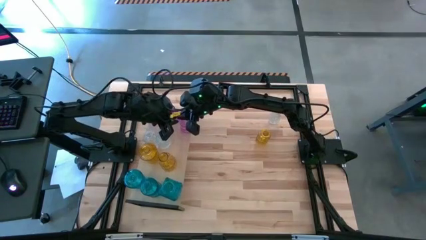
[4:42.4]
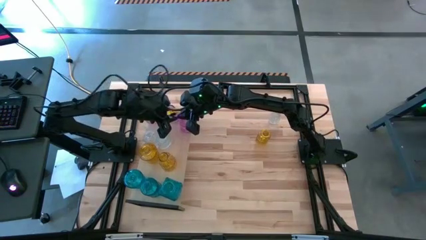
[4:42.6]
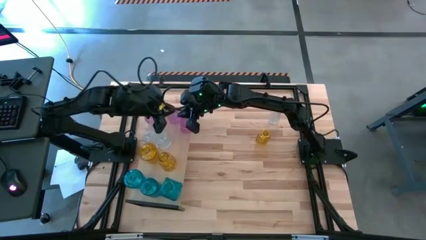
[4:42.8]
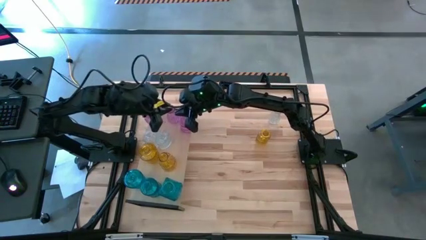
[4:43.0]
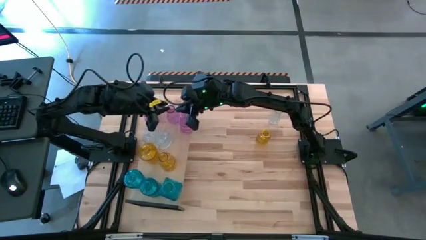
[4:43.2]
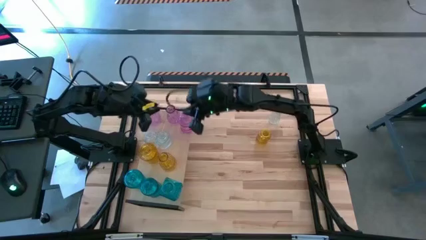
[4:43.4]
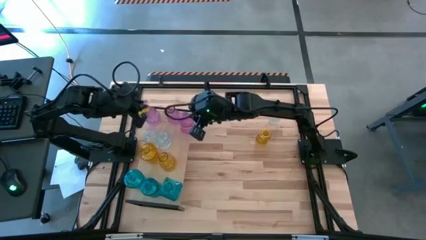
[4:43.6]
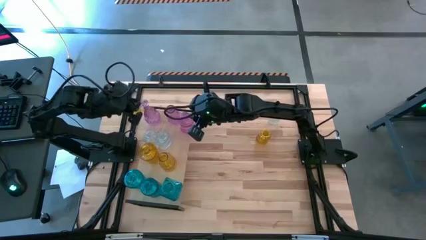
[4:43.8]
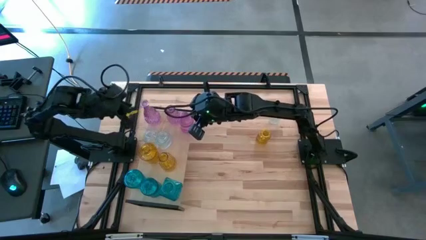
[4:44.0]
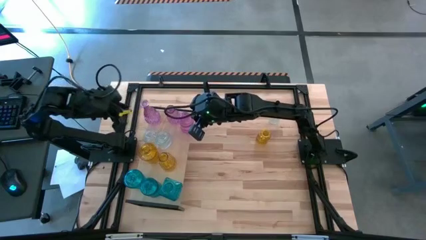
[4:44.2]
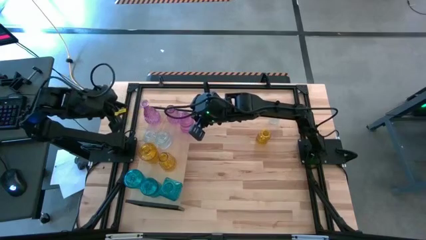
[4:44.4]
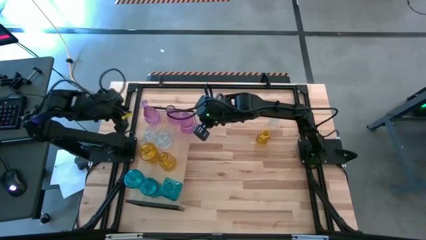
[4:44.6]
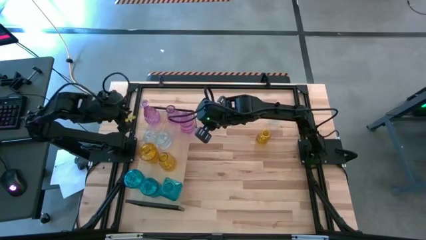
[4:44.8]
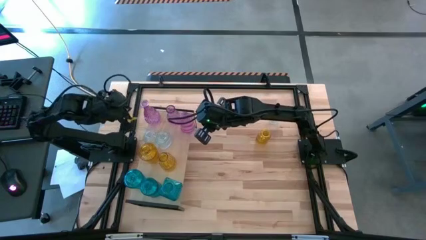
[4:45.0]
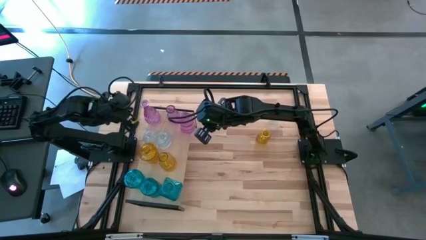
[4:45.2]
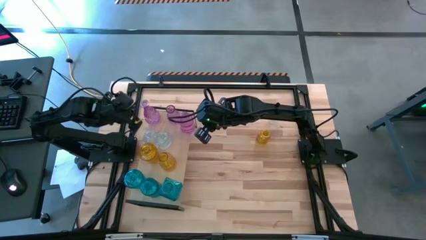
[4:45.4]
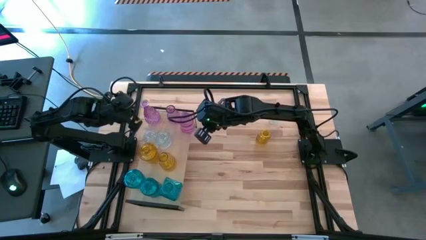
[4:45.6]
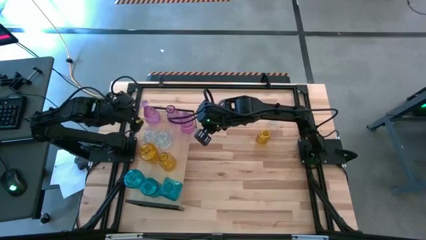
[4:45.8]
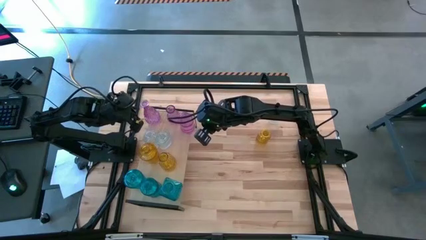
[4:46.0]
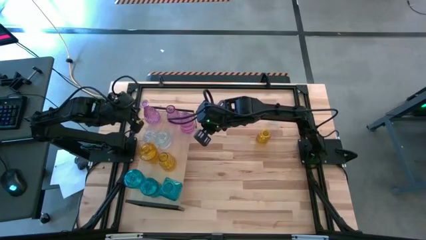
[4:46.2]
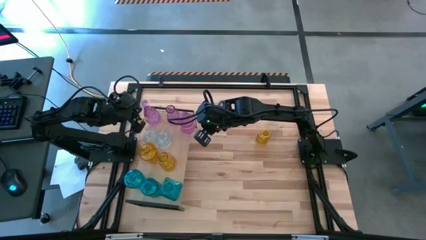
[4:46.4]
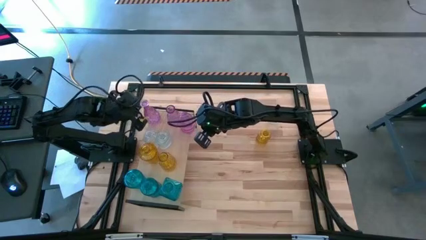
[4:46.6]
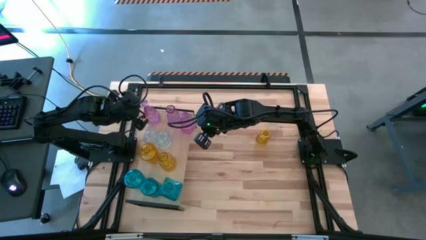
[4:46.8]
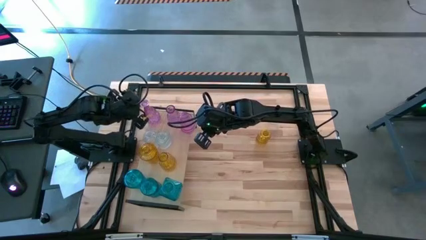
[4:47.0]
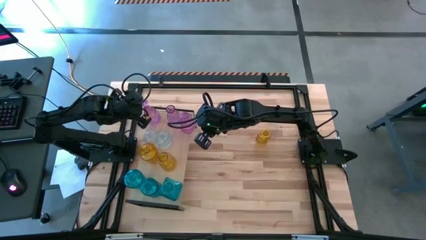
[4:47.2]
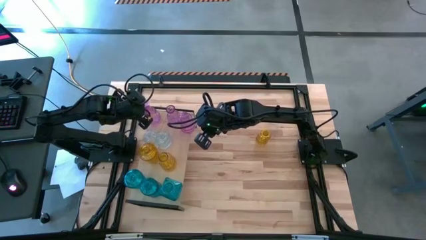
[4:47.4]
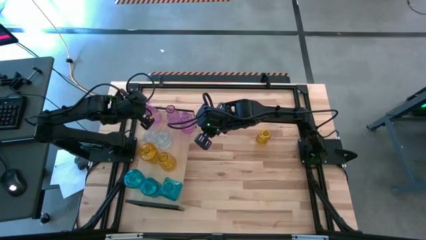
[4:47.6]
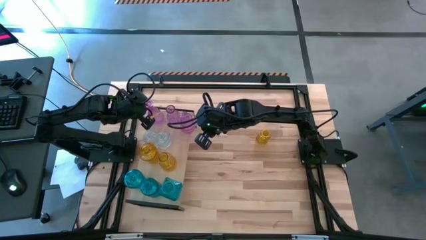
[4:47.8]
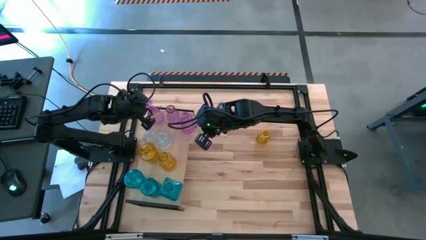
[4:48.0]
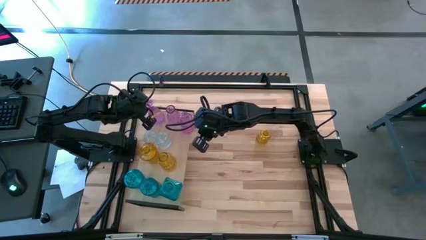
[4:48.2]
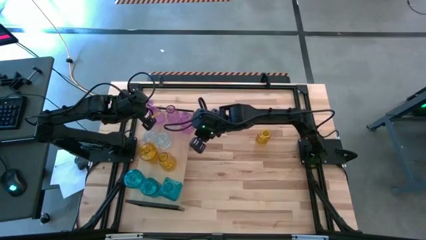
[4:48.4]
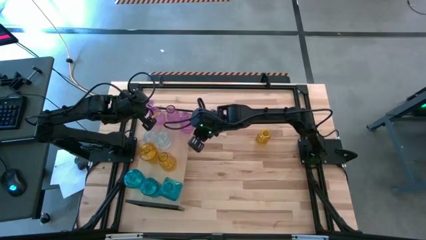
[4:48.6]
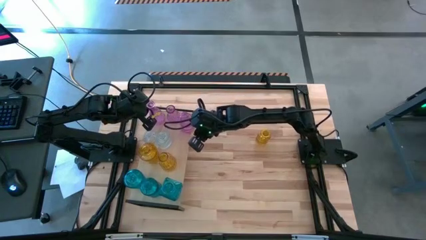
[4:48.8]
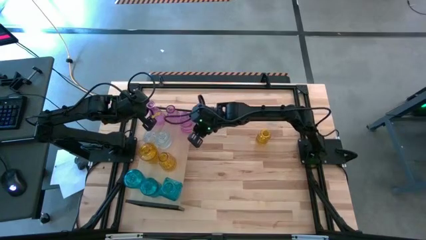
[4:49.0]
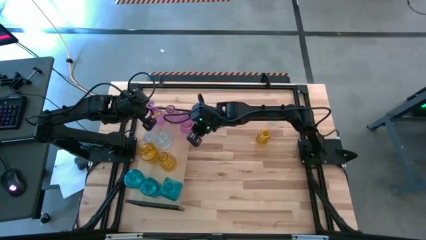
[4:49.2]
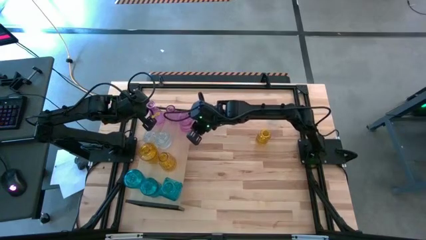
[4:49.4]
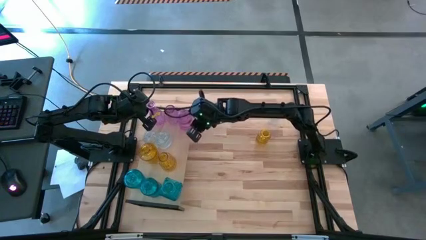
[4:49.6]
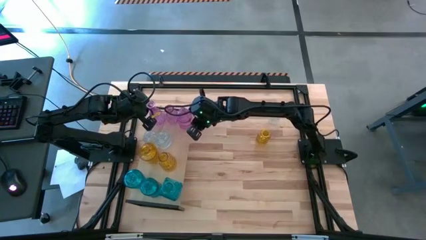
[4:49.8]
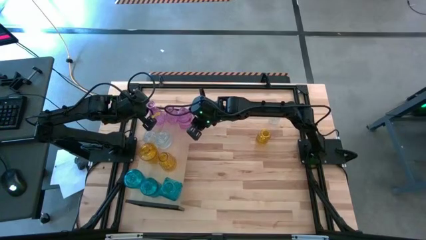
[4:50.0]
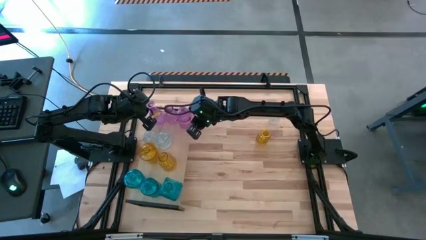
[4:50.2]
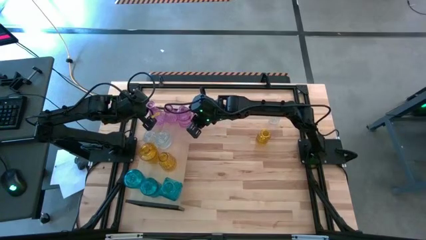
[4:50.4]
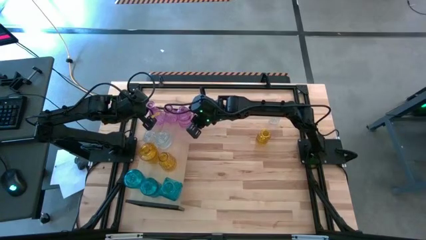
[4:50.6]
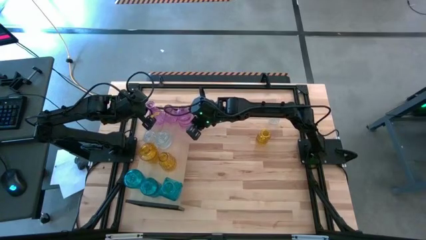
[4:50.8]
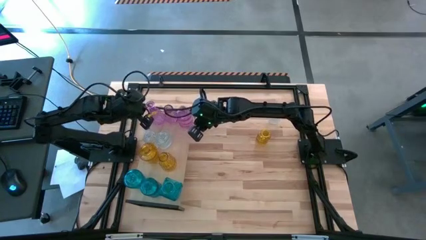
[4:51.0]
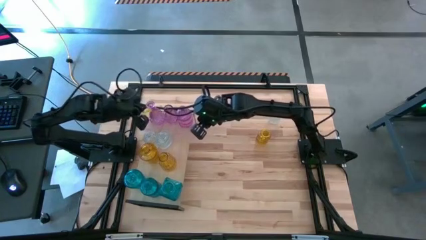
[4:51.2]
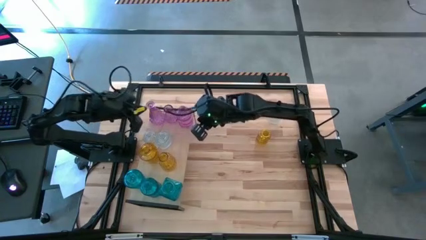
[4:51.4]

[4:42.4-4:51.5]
Task: sort vases onto shelf
Adjust the violet flower vase on the shelf

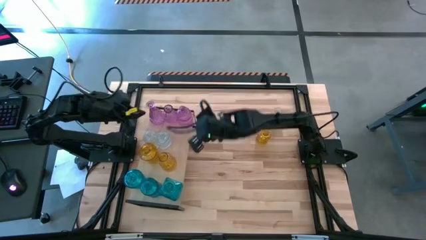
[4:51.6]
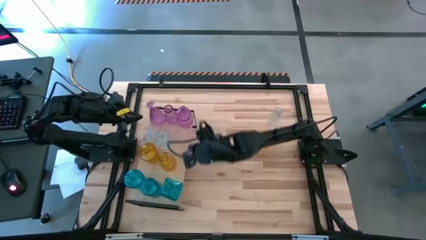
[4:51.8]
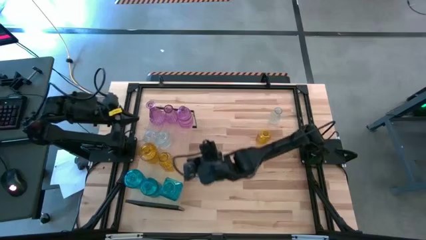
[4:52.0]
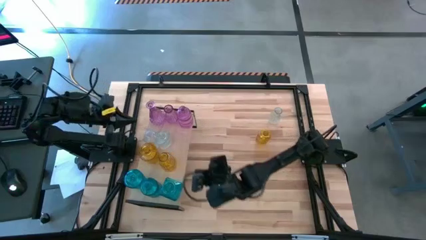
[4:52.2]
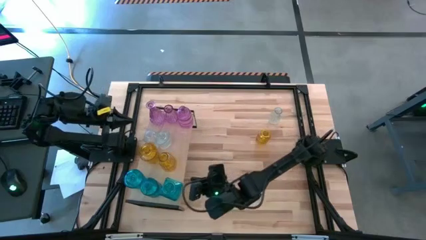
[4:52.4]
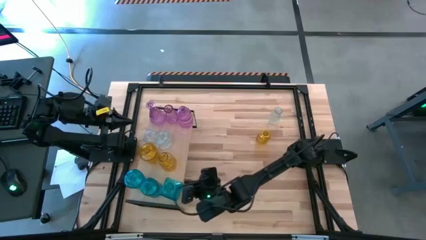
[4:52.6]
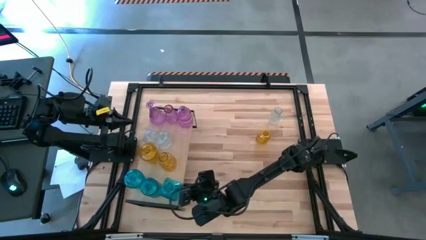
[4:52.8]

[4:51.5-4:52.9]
Adjust the blue flower vase on the shelf

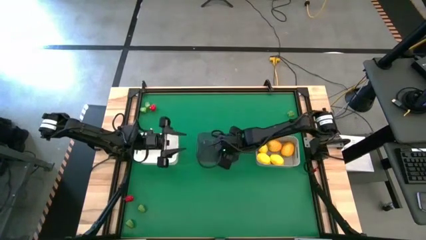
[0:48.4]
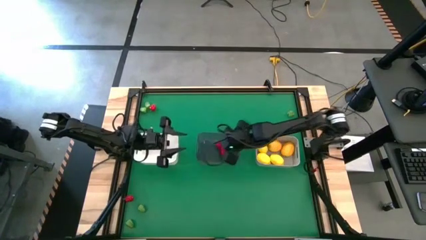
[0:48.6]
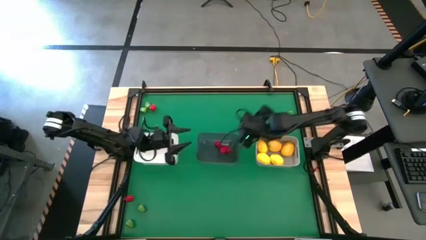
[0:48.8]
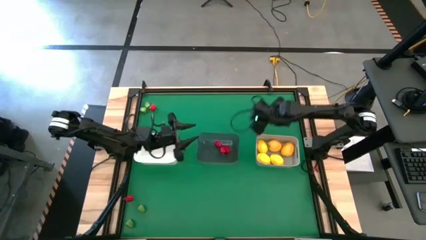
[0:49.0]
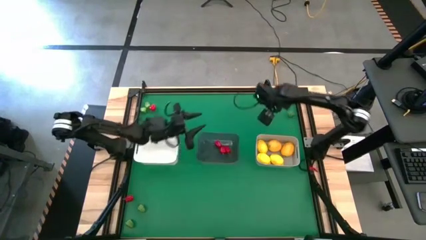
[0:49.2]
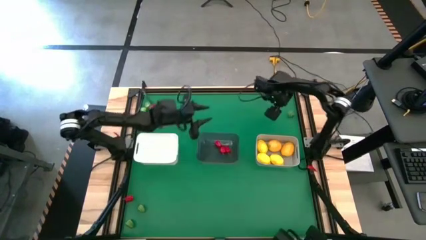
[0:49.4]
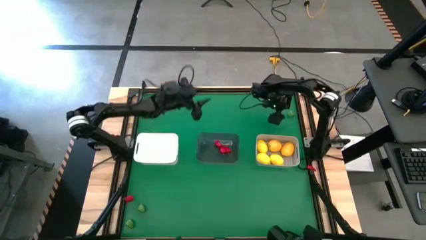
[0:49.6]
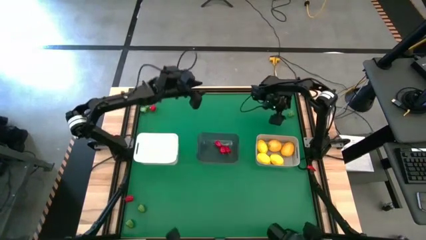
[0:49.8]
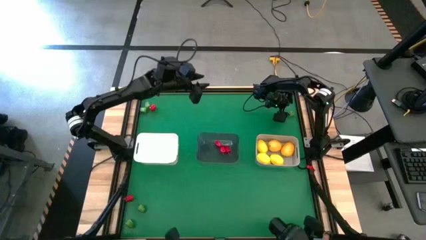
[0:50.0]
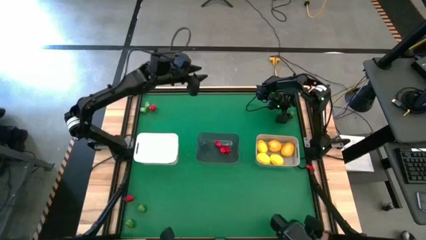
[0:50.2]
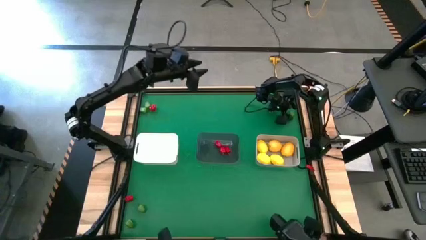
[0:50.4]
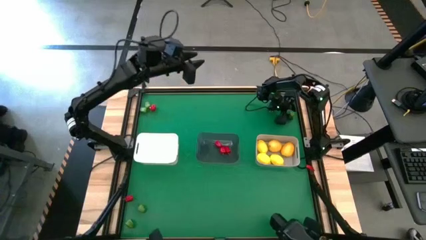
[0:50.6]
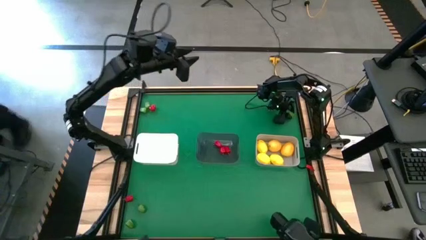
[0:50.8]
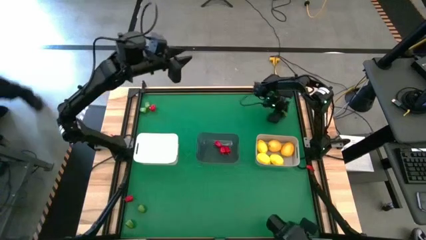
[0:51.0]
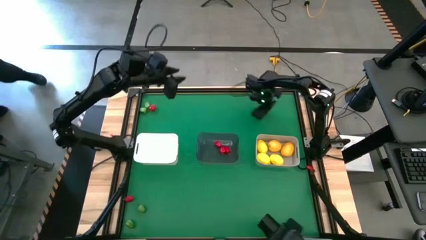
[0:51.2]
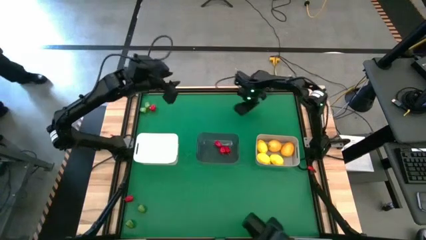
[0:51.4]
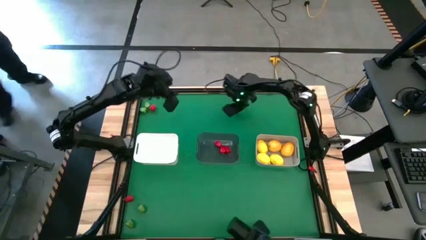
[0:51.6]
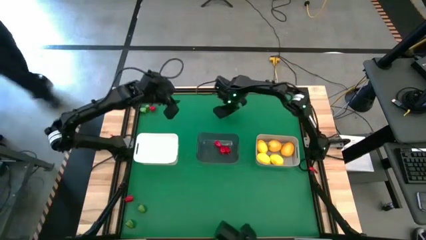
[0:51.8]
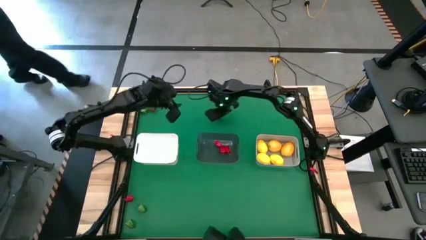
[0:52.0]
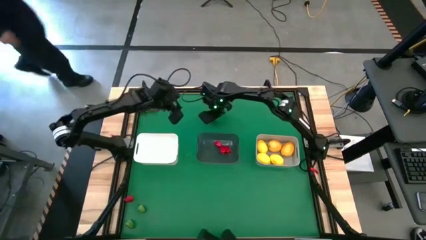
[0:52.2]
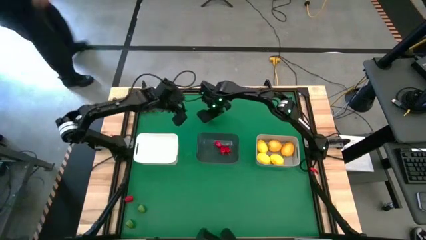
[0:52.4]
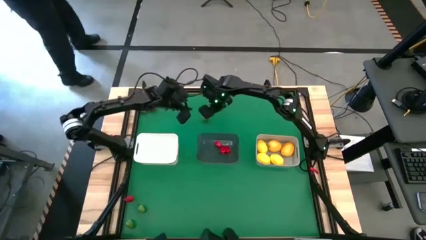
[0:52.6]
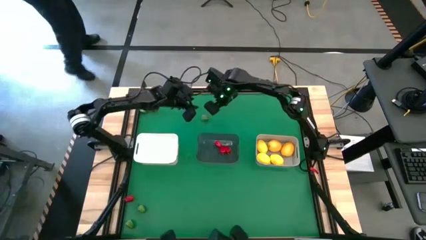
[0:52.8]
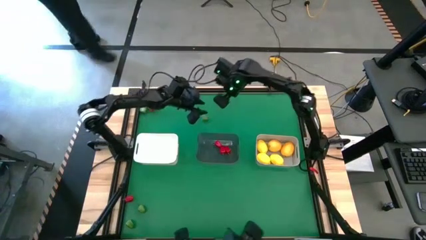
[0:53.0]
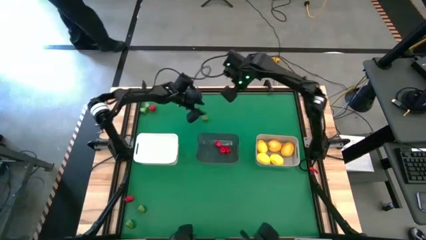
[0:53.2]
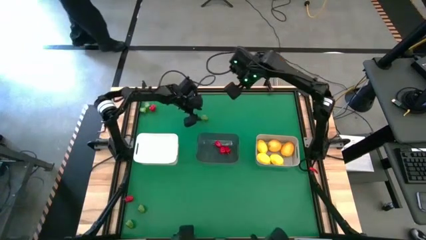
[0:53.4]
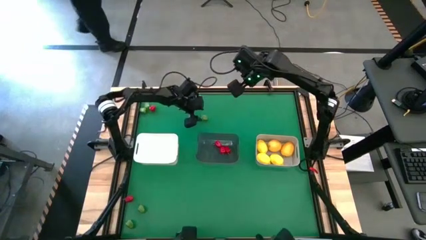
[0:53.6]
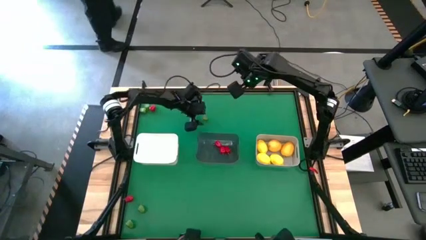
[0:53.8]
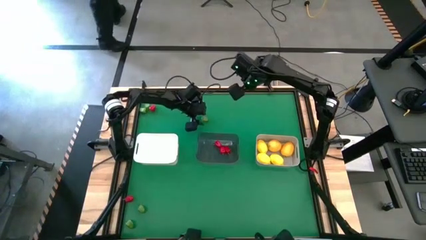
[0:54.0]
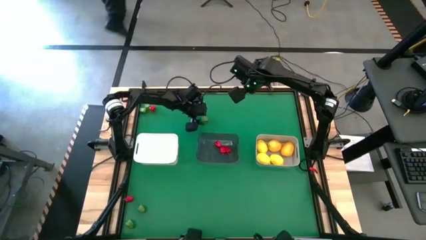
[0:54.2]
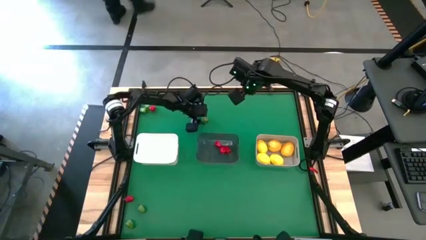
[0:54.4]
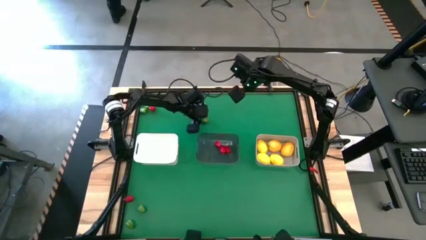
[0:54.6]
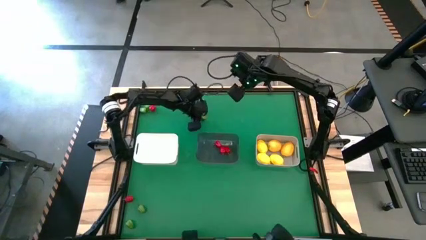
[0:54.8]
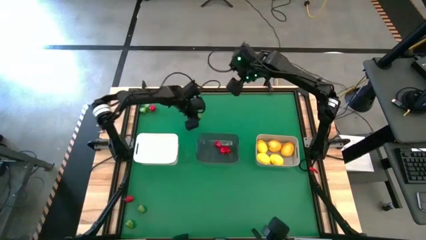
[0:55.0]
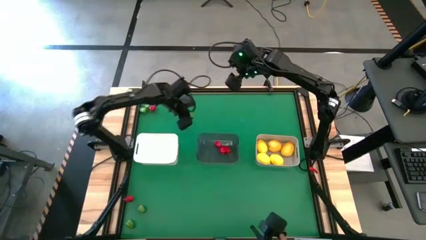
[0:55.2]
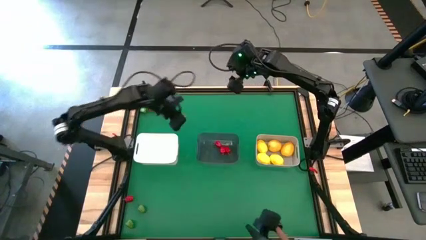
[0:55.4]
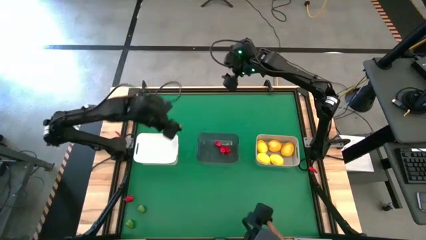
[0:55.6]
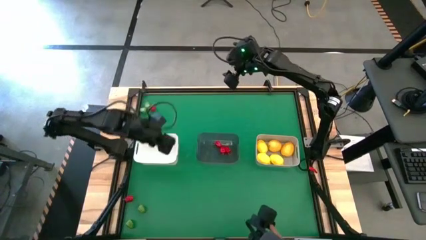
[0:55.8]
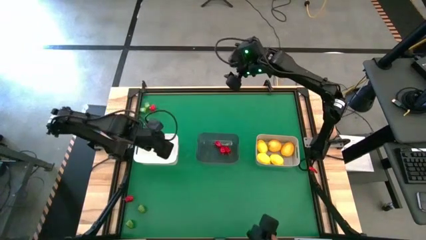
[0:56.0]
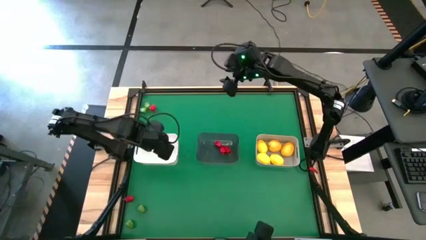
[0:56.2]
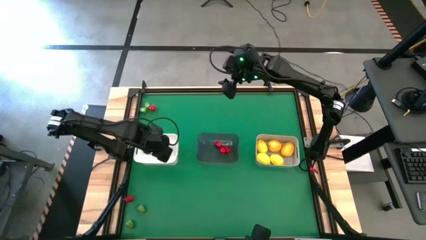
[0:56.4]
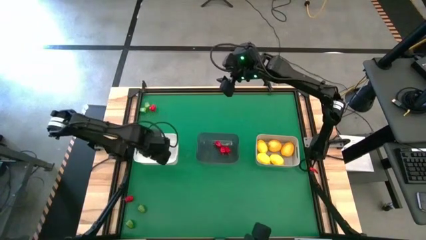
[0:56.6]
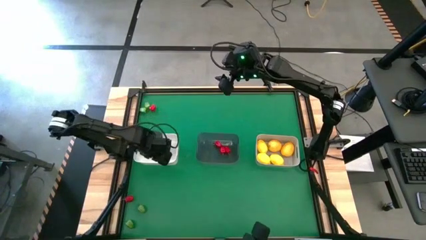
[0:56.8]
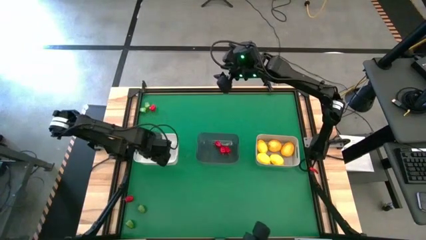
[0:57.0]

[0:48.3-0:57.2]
Task: Sort produce into baskets
Put the green chili pepper into the white bin
